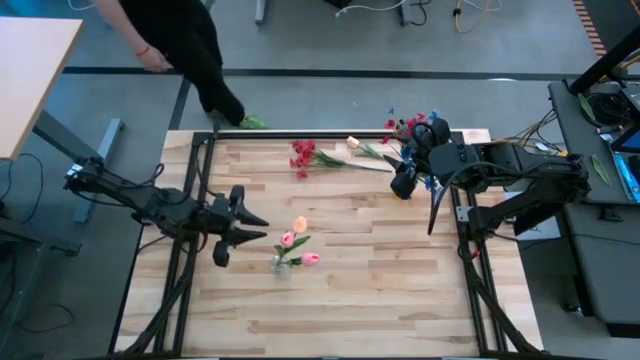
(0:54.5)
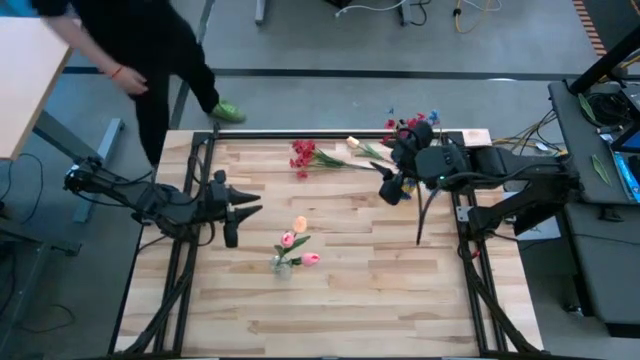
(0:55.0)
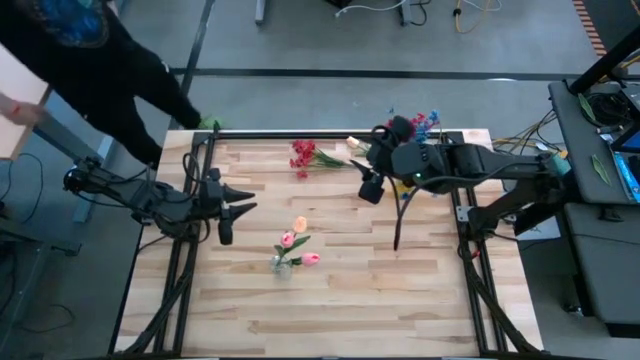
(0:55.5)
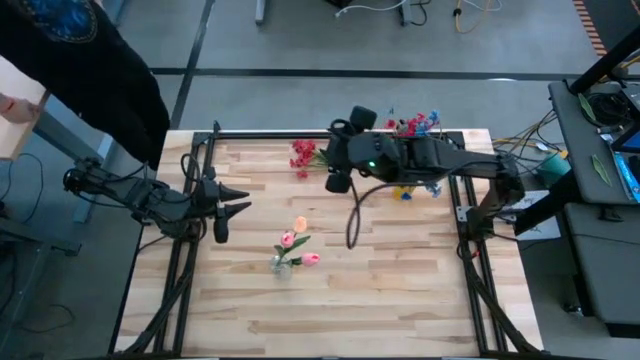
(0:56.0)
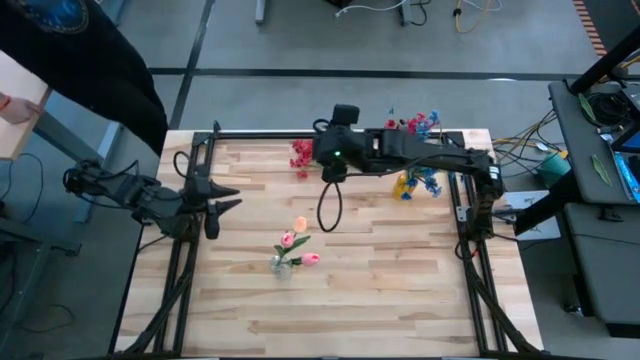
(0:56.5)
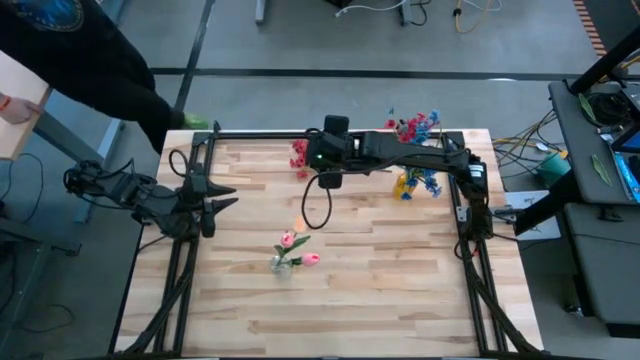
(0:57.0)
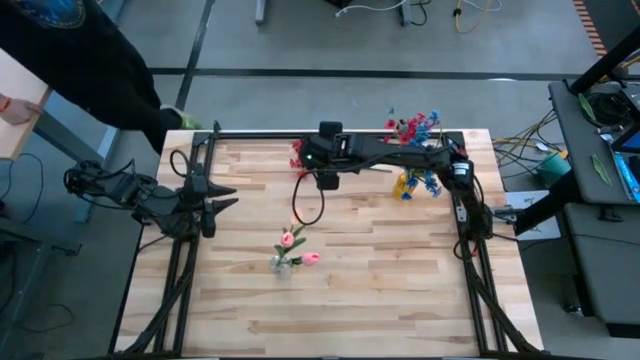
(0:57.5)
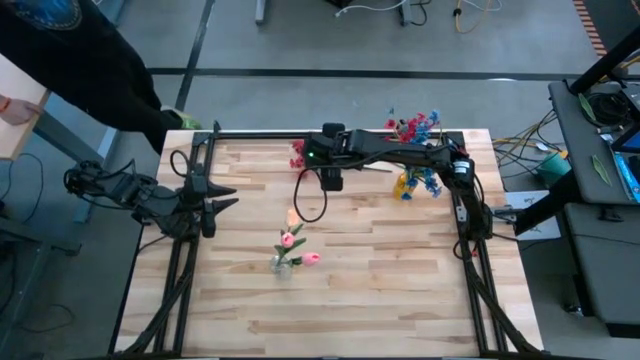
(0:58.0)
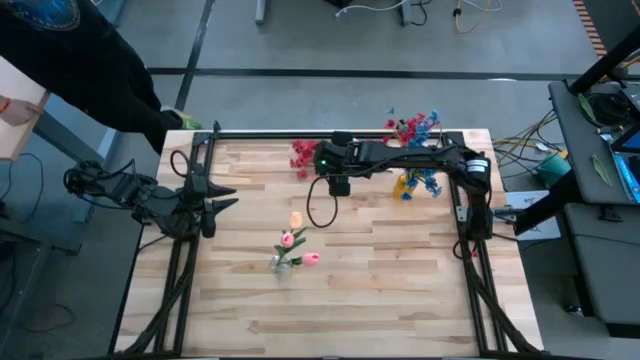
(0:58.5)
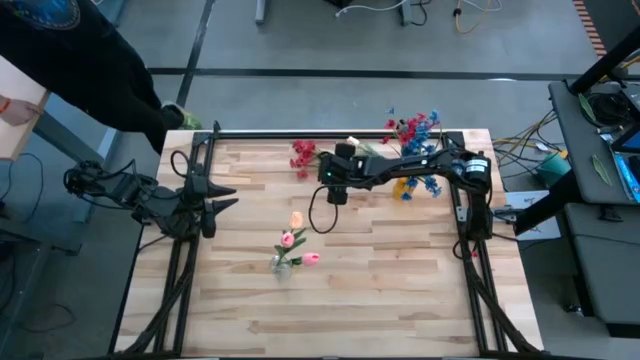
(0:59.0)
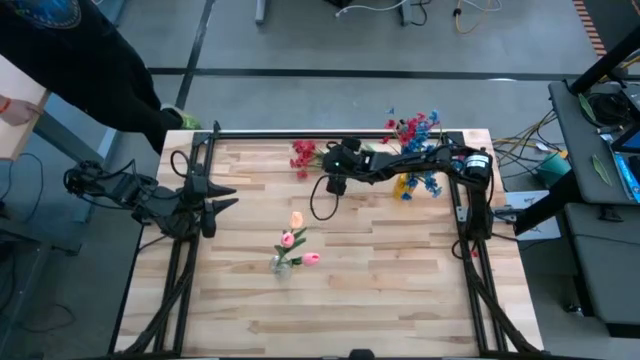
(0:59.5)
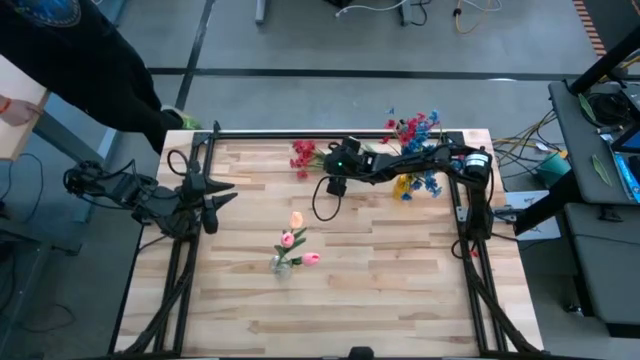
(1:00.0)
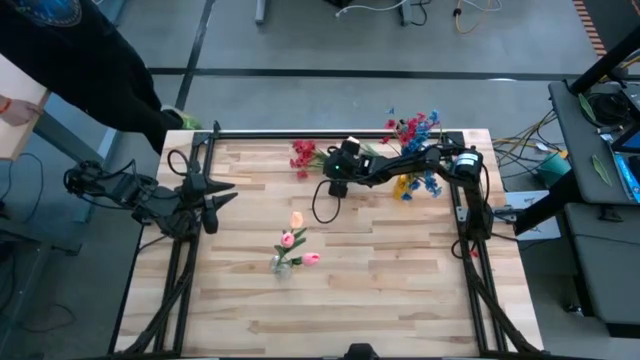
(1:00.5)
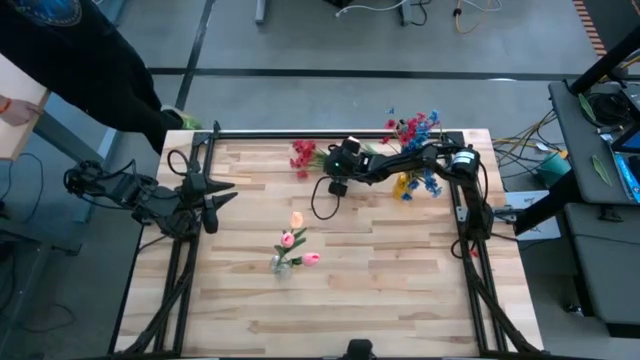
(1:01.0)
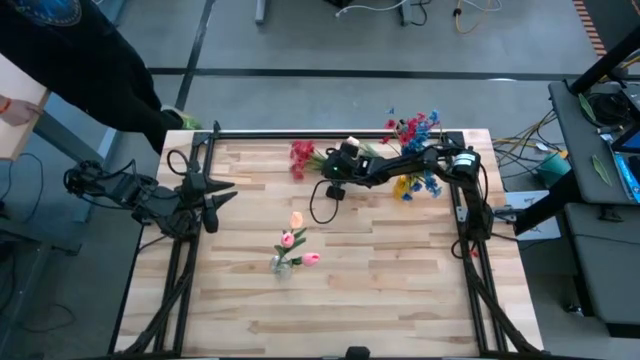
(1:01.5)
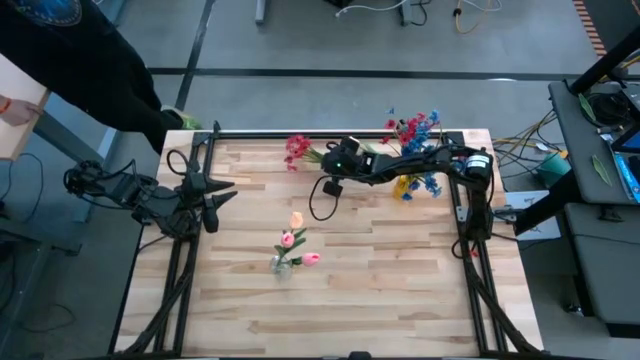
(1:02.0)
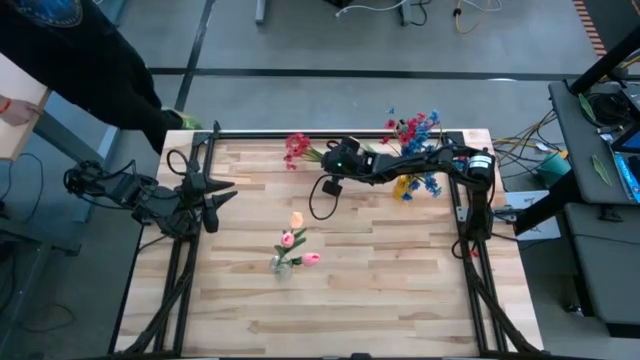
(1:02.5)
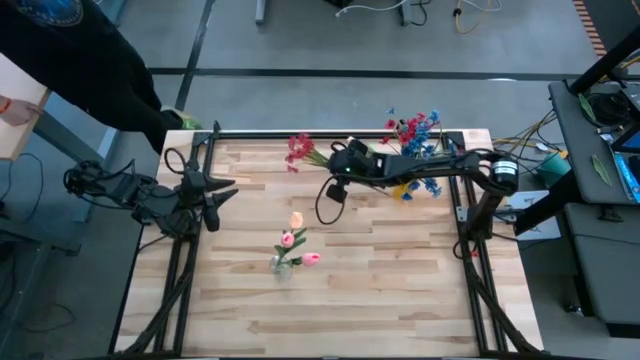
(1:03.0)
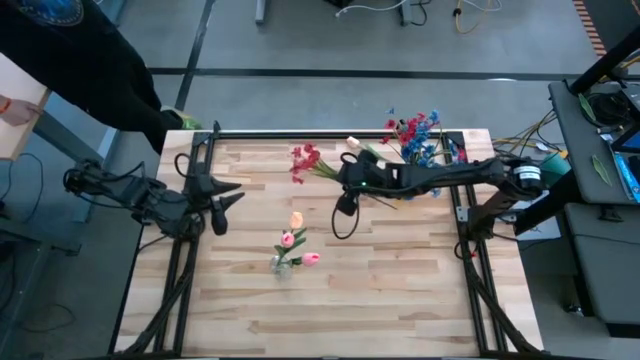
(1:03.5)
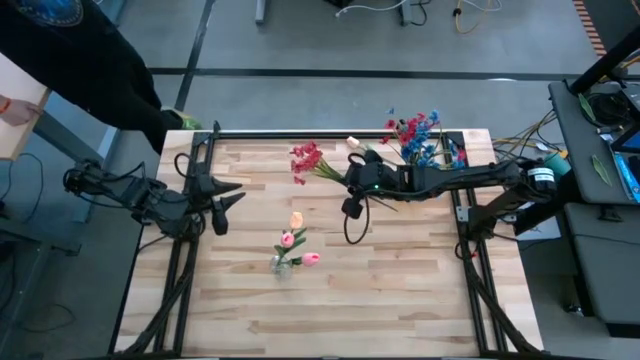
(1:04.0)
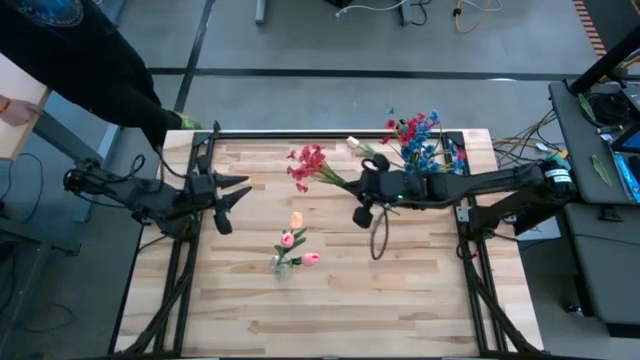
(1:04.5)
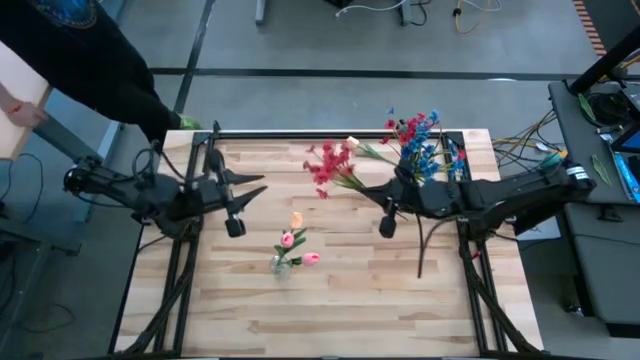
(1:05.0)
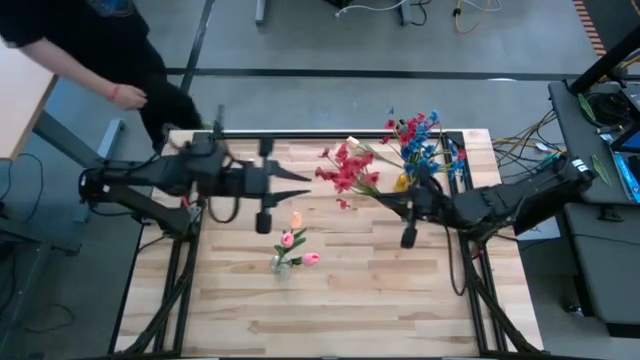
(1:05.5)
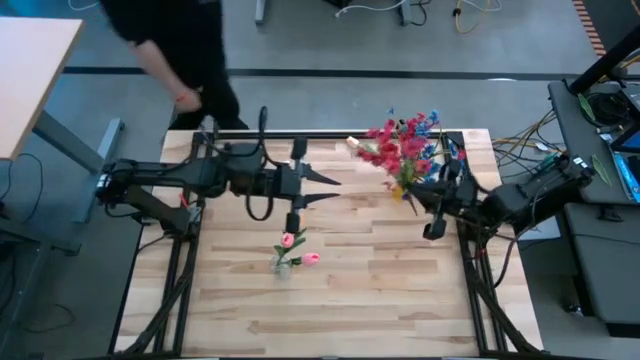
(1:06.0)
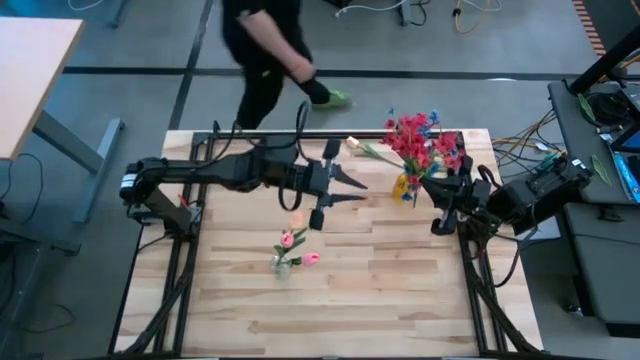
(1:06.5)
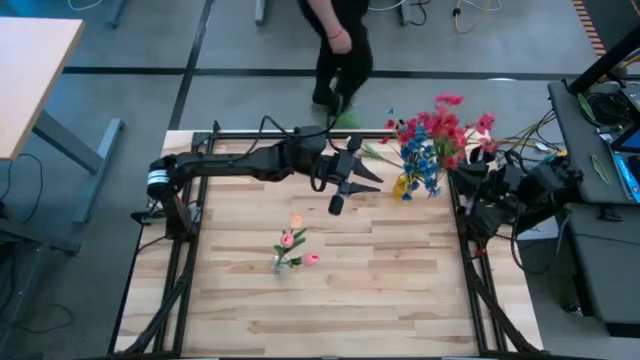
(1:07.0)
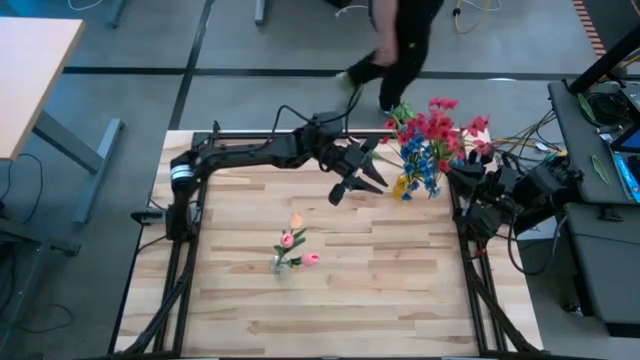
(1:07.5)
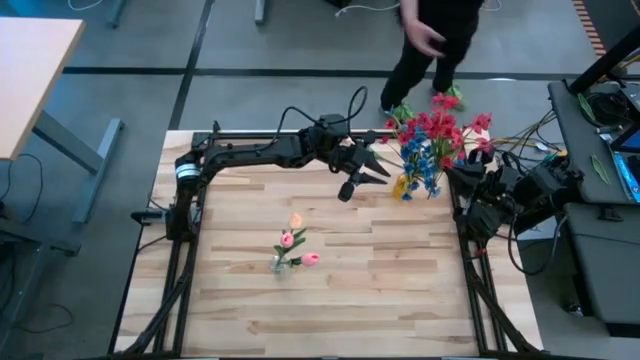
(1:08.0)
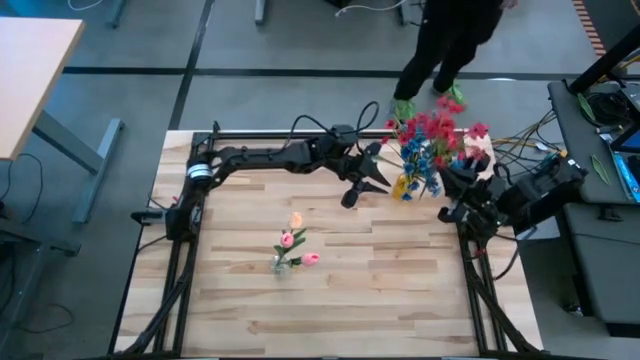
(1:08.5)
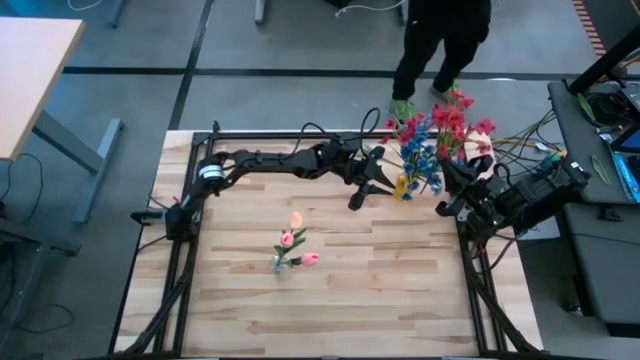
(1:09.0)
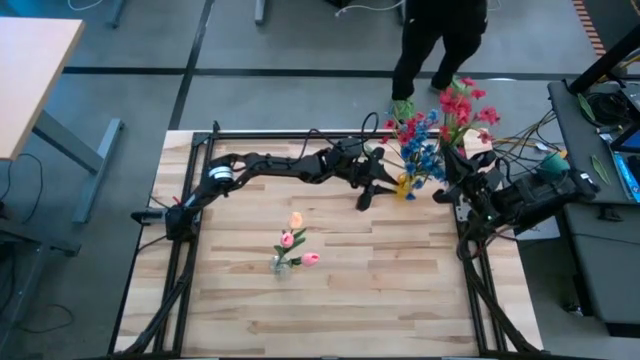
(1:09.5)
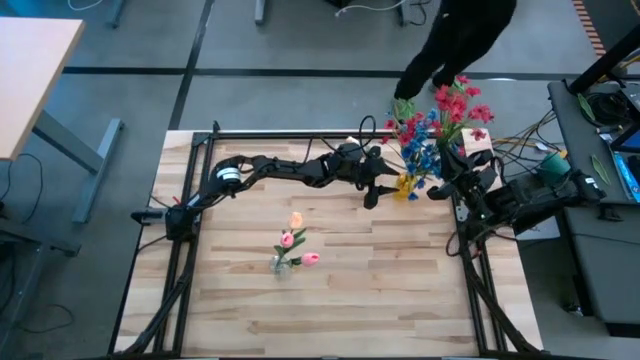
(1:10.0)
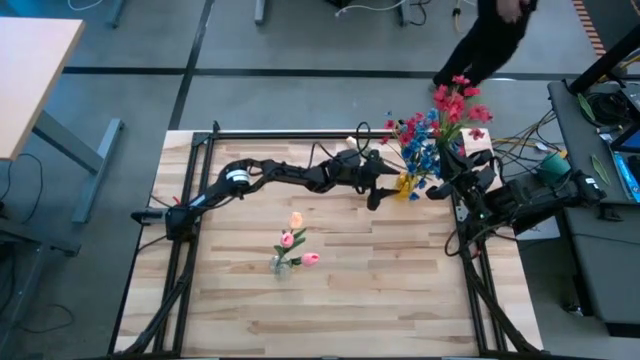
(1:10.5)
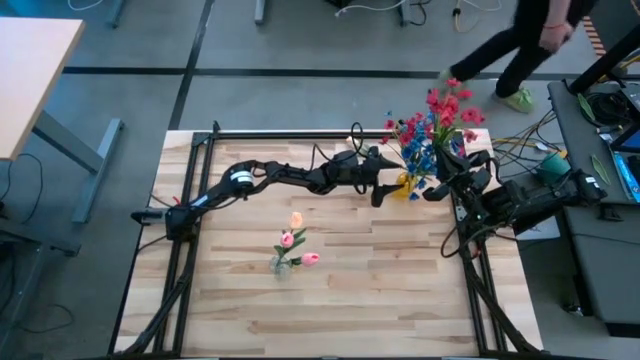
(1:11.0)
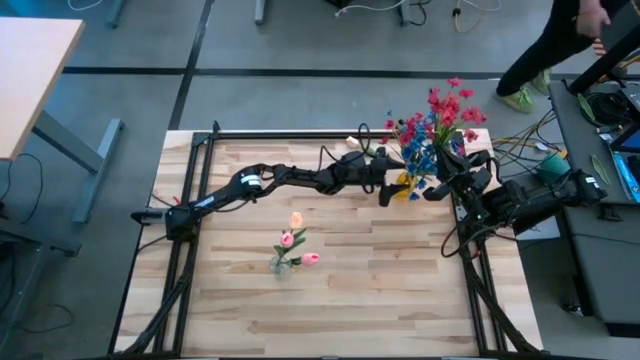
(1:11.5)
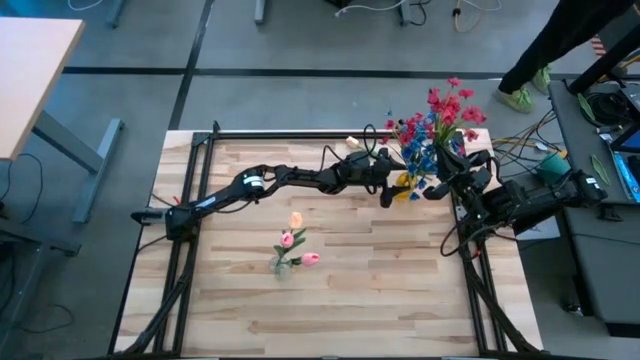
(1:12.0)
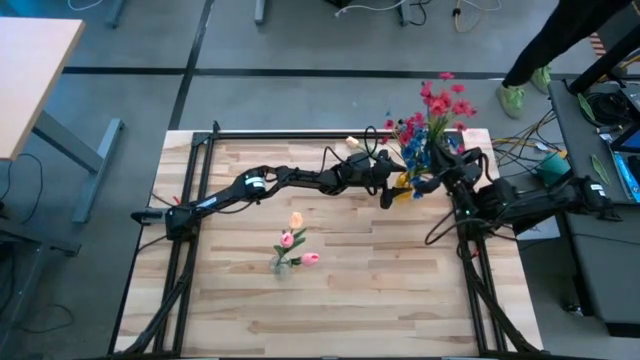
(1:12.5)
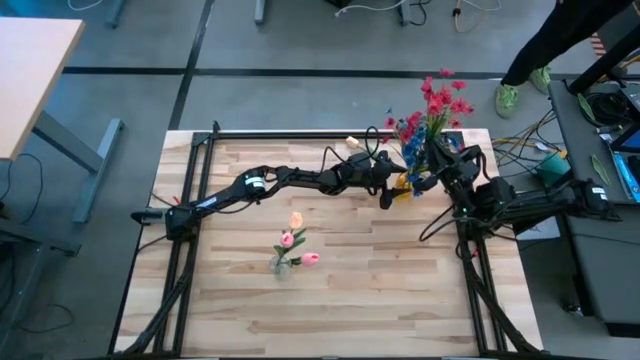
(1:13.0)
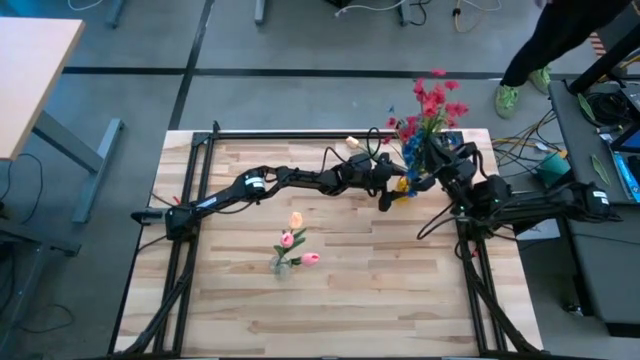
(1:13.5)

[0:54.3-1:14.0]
Task: Sort flowers into vase by color
Put the red flowers into the yellow vase

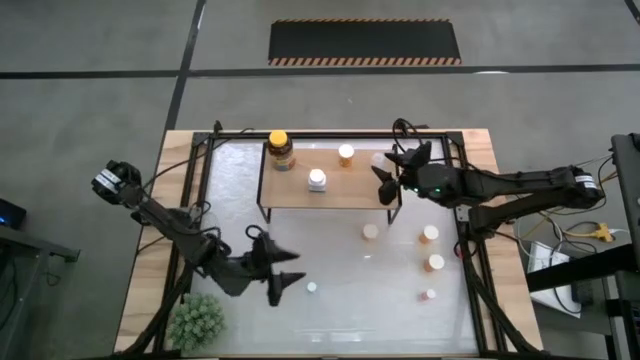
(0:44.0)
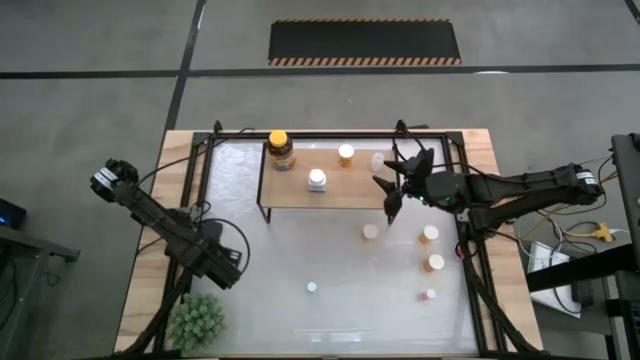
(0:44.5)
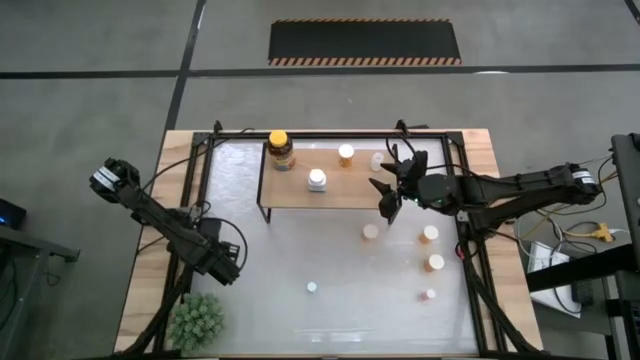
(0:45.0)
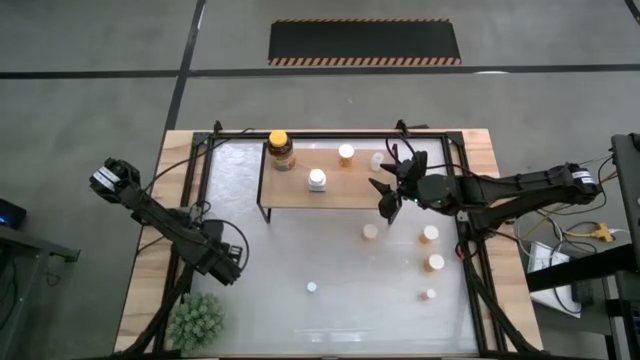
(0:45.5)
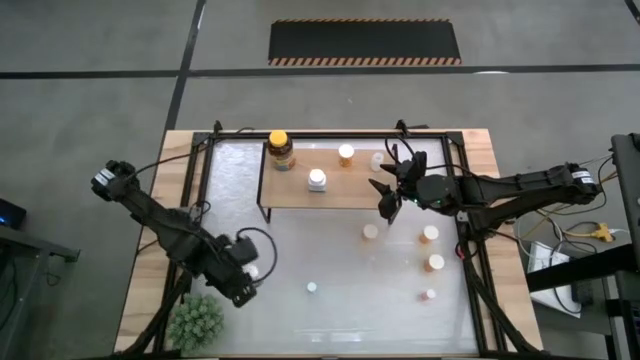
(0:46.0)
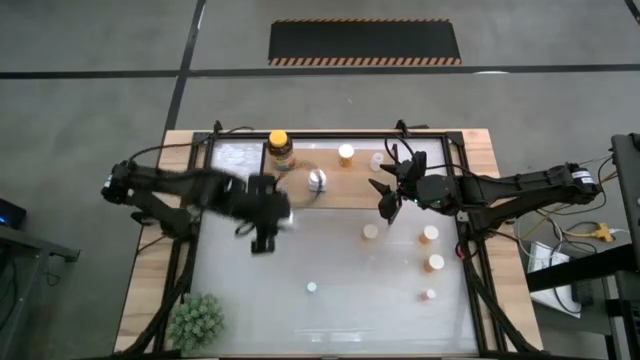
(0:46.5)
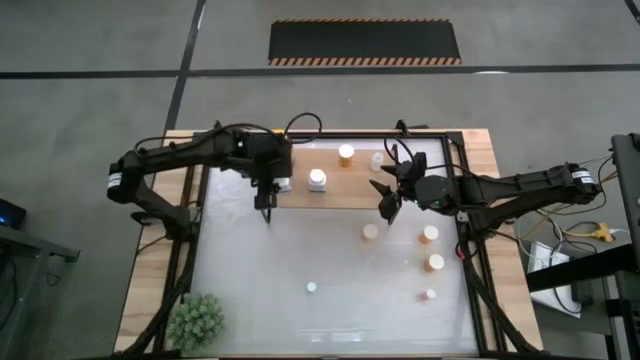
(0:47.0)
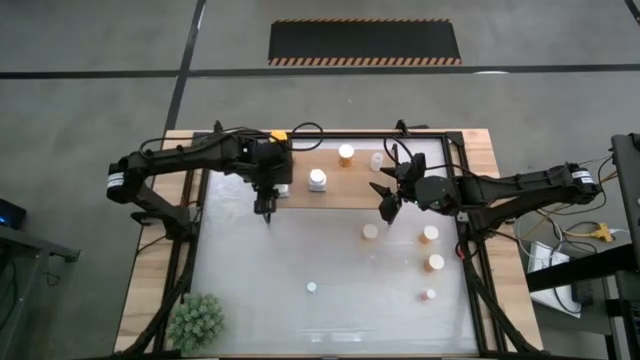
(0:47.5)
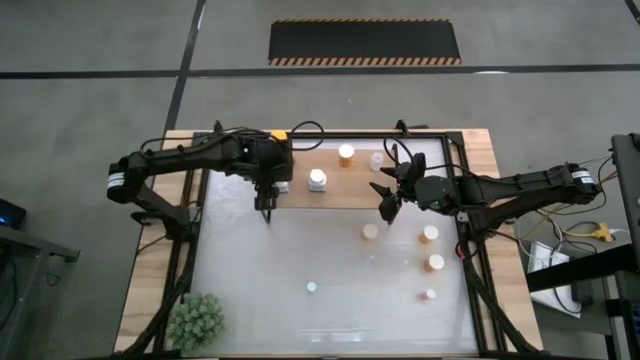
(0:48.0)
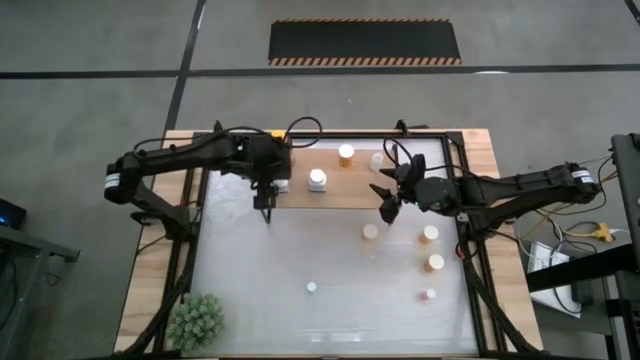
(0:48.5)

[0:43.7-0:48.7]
Task: Pick and place medicine bottles onto shelf by color
Put the white blue pill bottle on the shelf
